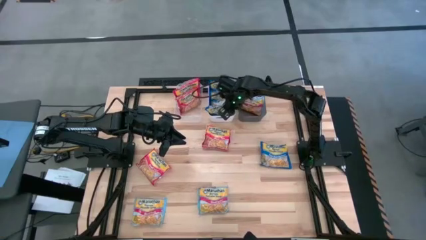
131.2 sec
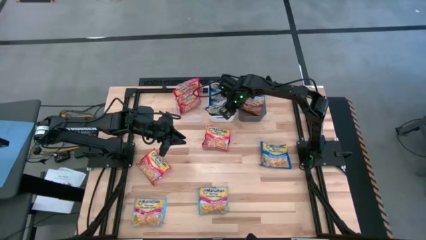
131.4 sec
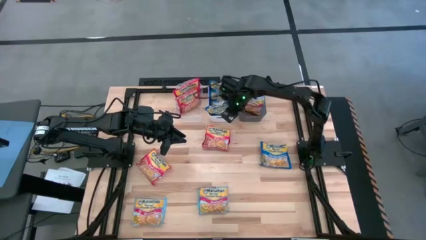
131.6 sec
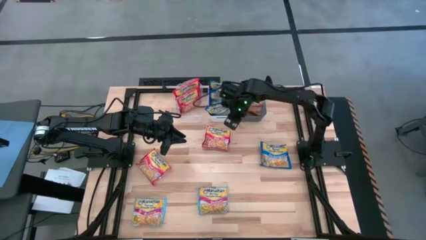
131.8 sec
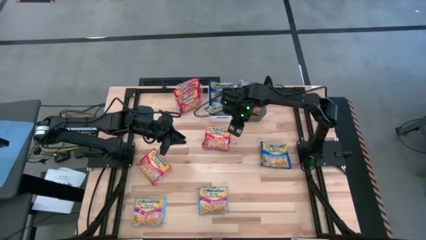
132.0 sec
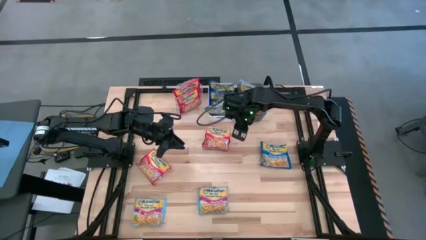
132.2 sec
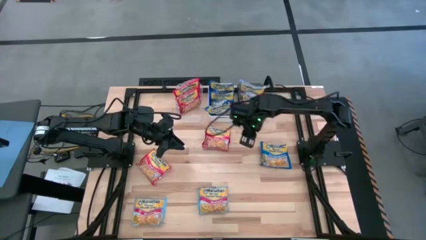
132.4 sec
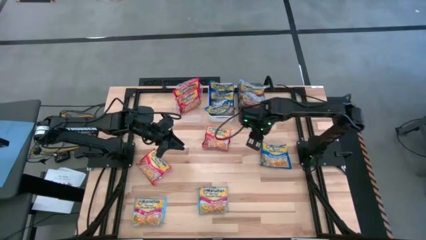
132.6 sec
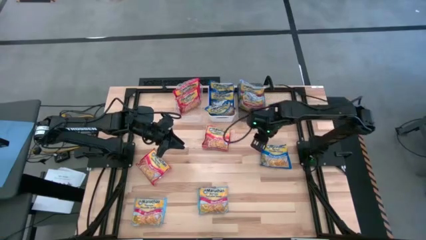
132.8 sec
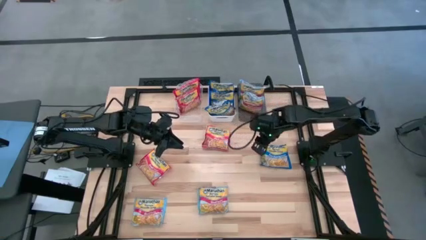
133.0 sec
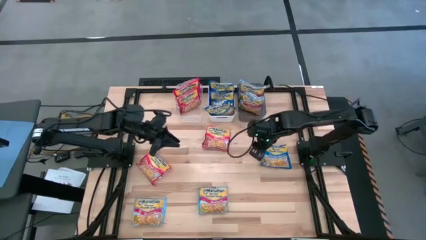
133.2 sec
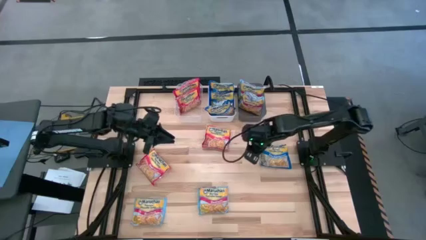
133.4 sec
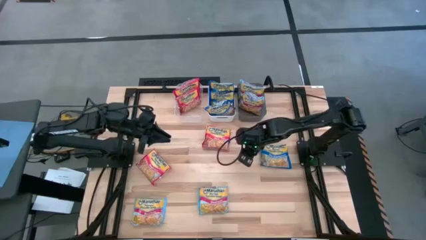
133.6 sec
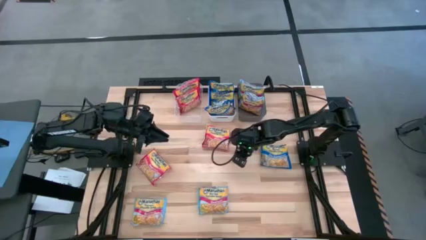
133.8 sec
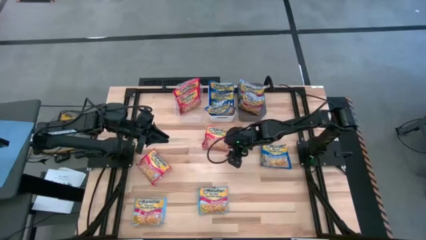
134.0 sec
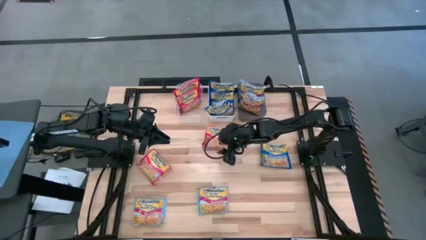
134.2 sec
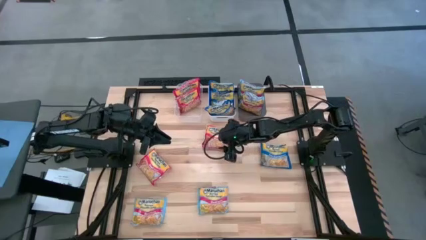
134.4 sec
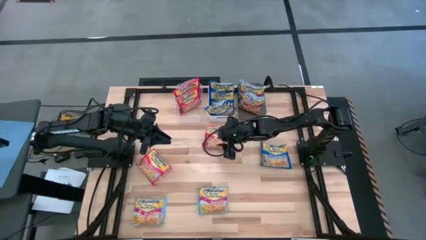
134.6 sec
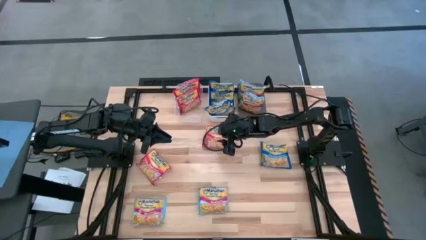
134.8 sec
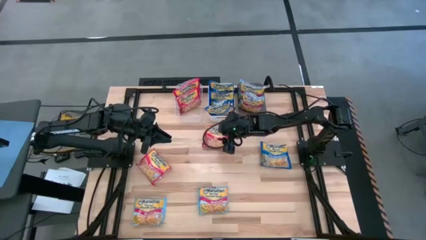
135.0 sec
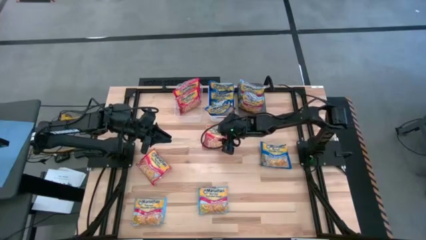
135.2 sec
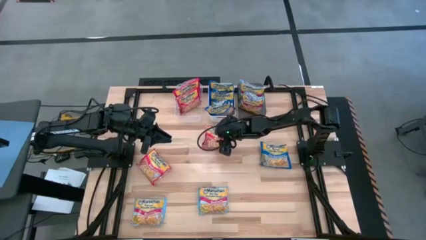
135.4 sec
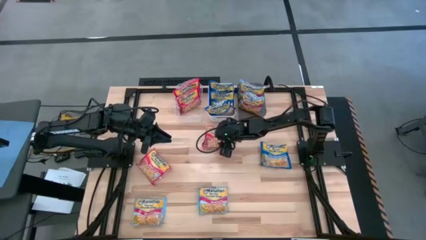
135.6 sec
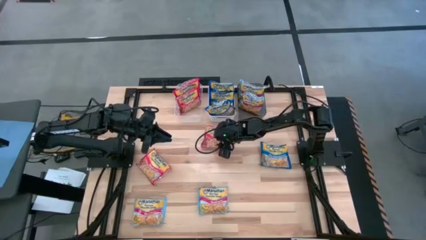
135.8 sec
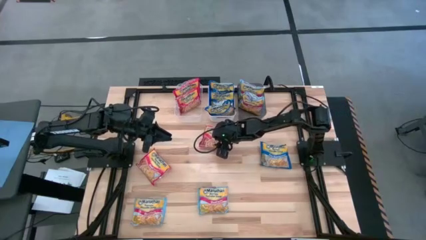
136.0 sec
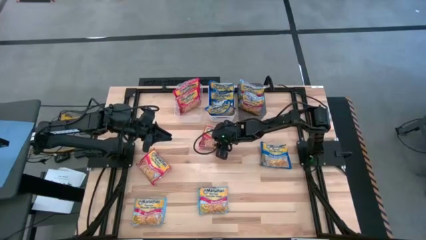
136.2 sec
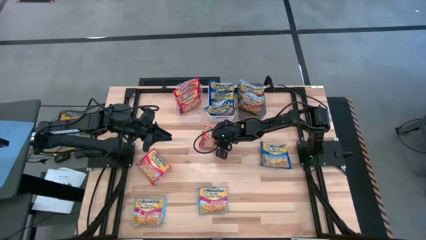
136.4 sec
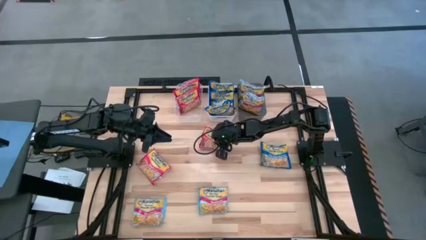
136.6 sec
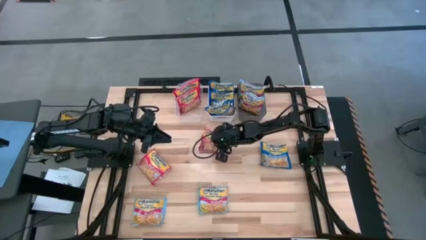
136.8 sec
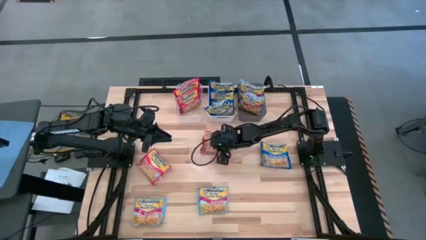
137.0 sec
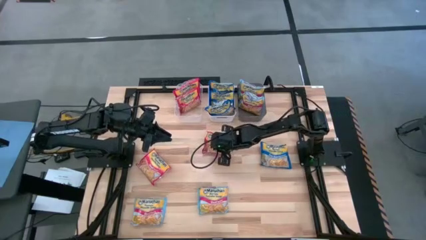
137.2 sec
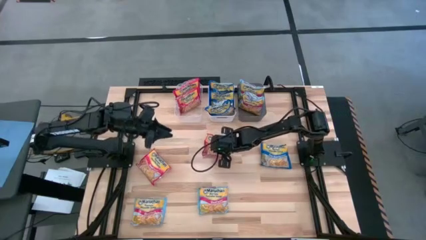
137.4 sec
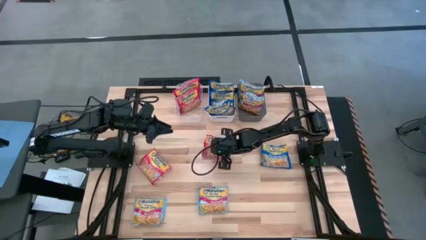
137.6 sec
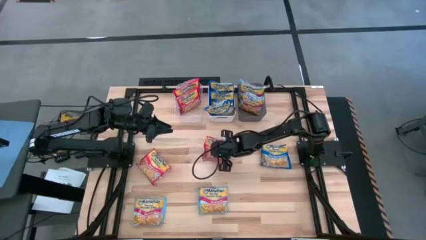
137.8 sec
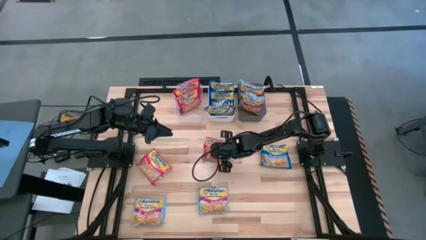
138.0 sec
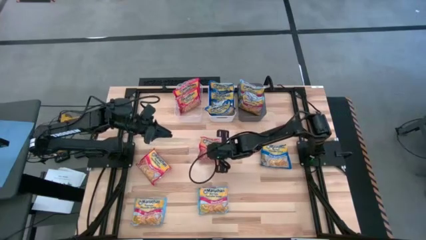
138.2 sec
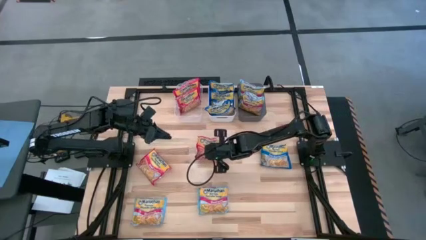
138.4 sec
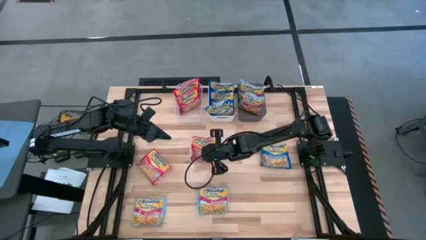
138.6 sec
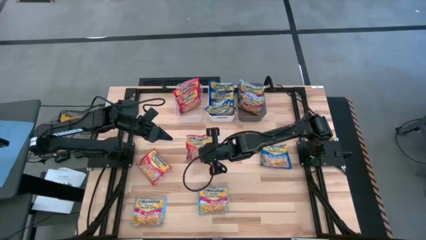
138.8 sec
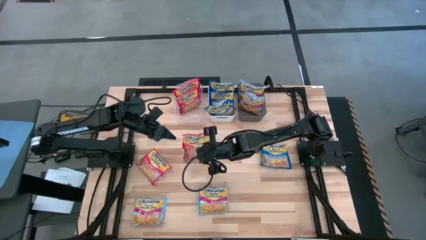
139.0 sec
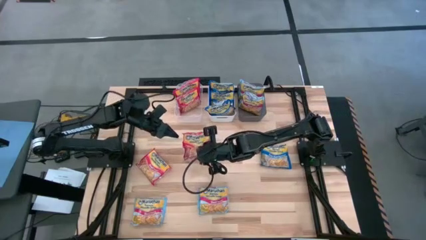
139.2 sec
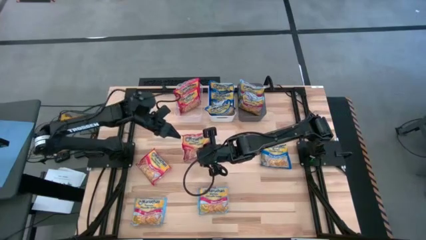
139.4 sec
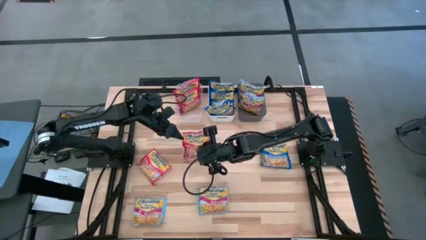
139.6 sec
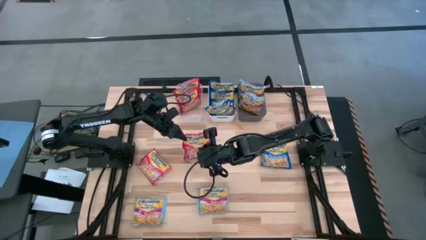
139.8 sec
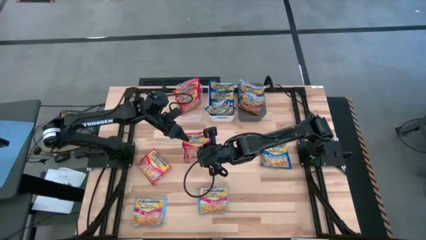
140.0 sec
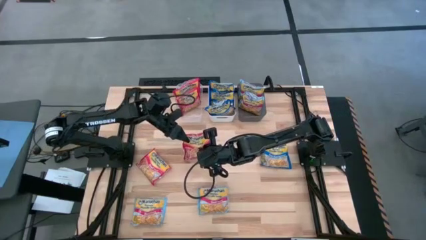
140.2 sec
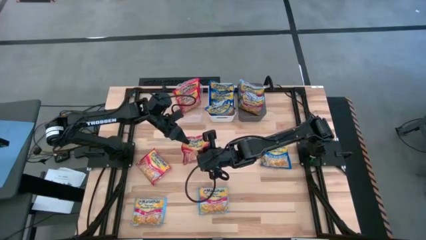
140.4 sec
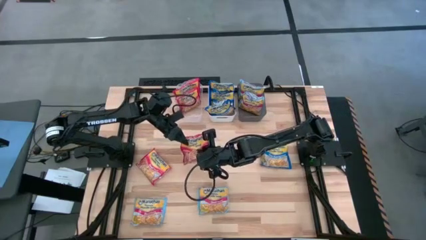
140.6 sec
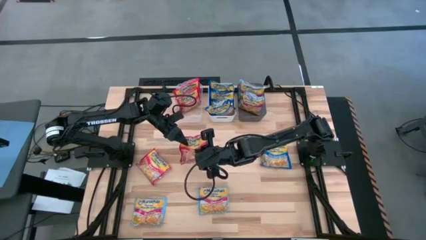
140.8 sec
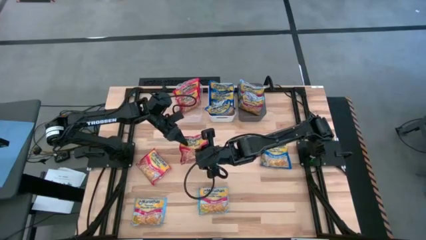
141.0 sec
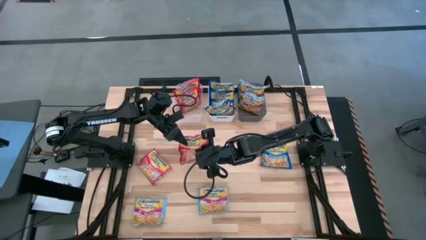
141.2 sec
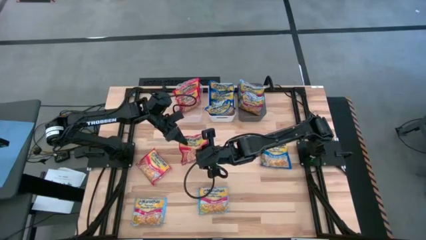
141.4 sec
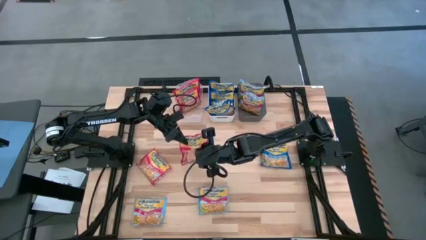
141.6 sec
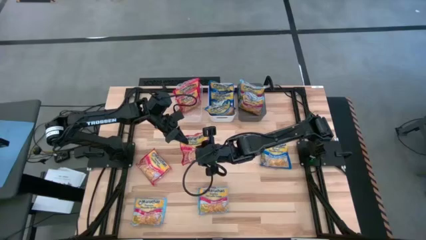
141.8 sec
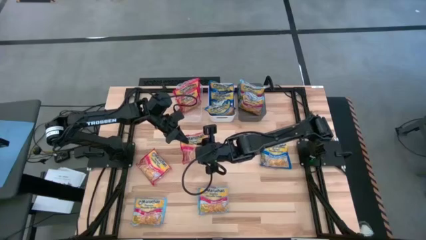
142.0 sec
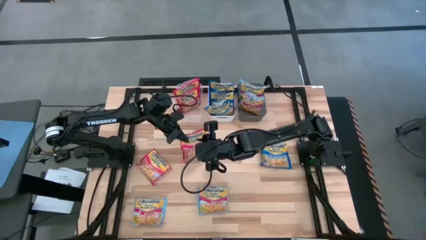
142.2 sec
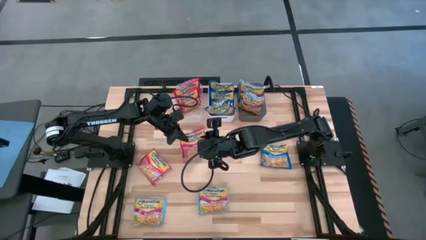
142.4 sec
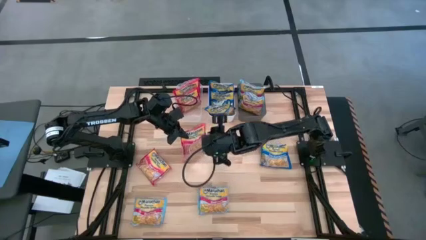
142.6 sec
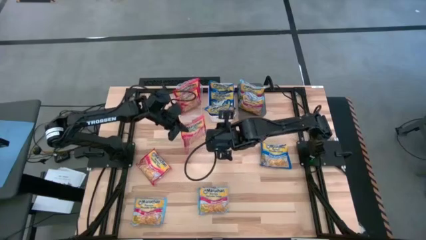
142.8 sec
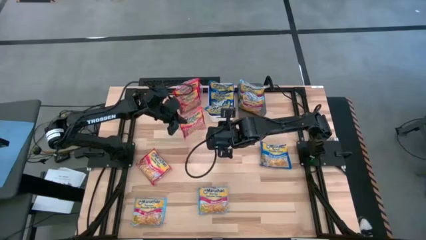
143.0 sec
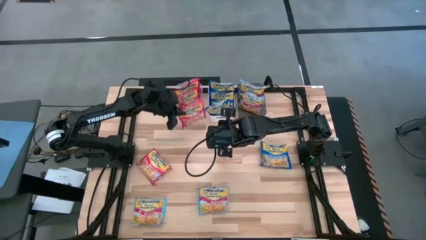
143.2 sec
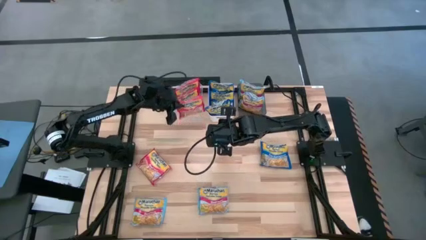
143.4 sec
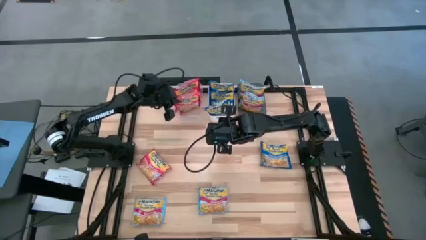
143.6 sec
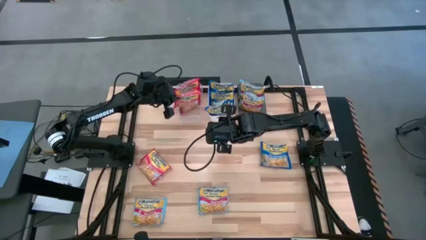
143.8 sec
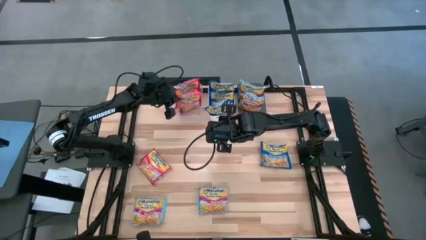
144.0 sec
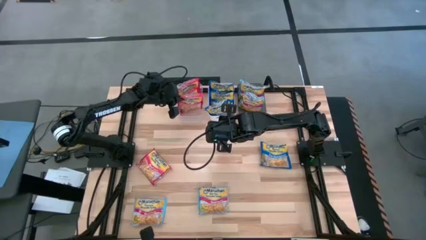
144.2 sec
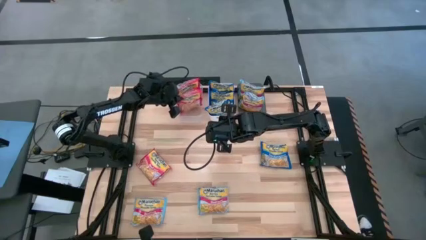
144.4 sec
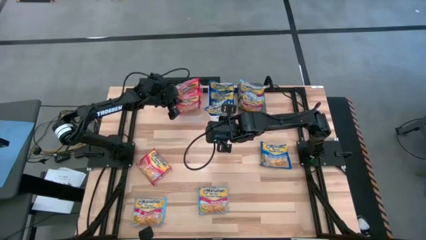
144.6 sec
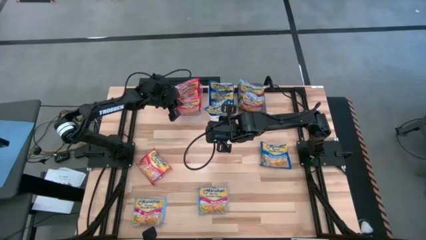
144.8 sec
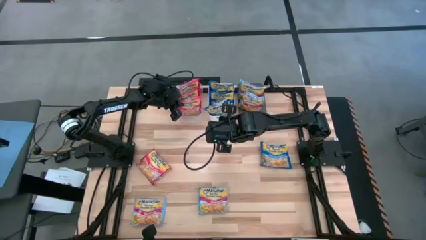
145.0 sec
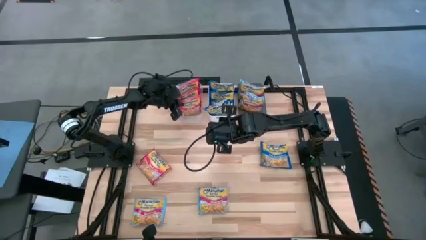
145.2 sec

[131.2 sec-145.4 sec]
Task: Sort Maruchan noodles
Put the red noodle pack into the transparent bin

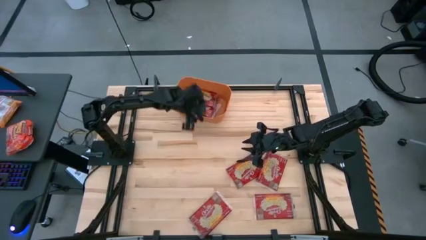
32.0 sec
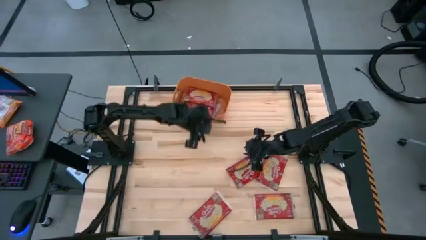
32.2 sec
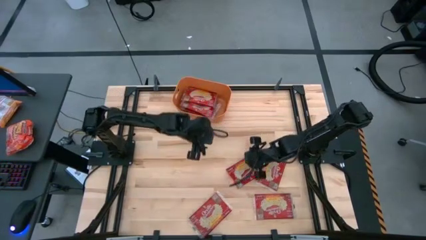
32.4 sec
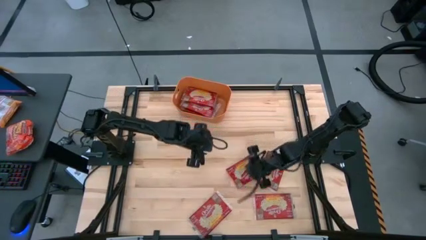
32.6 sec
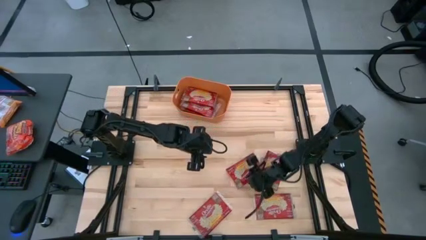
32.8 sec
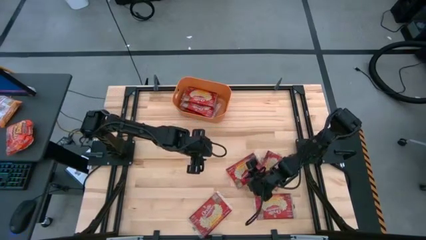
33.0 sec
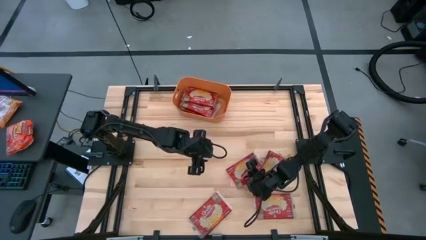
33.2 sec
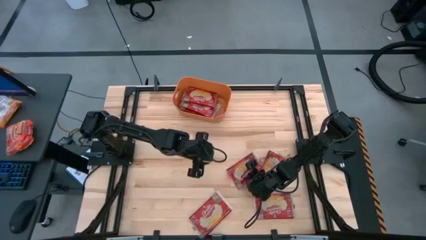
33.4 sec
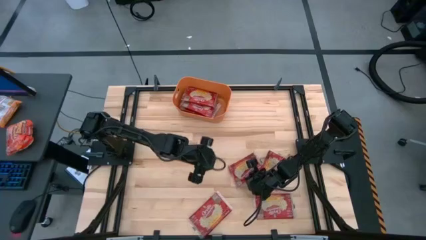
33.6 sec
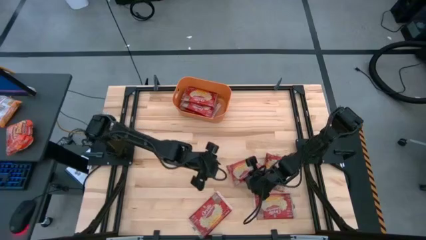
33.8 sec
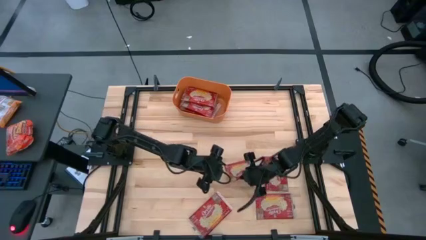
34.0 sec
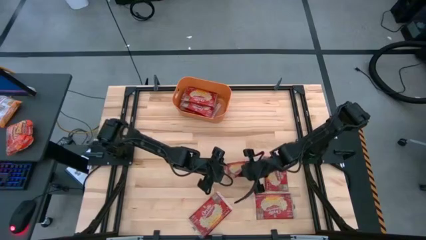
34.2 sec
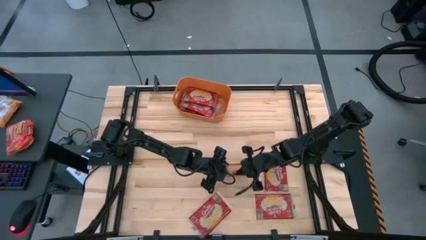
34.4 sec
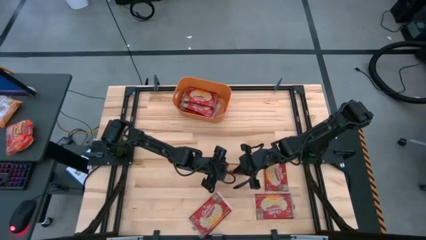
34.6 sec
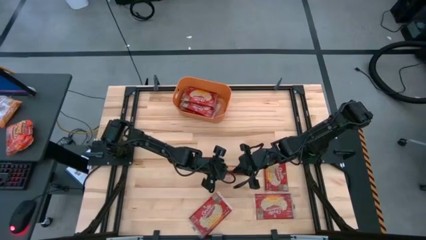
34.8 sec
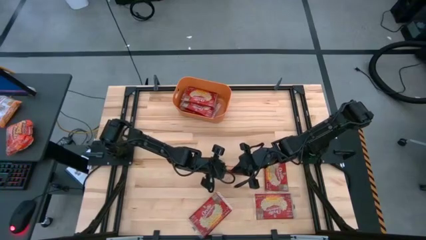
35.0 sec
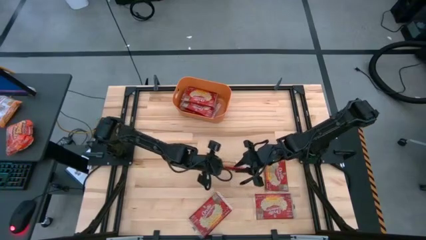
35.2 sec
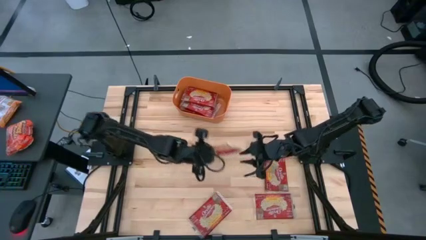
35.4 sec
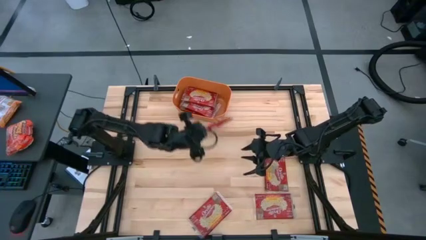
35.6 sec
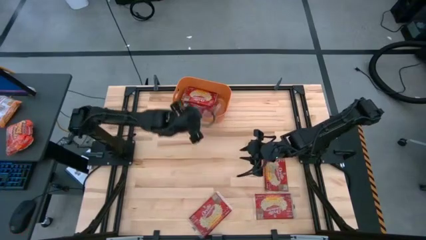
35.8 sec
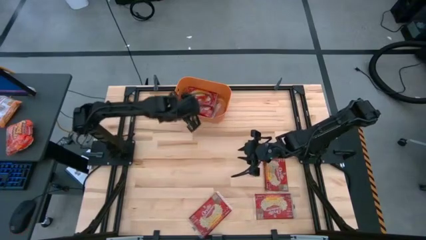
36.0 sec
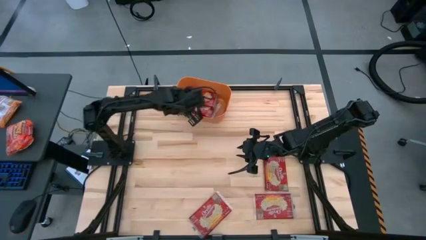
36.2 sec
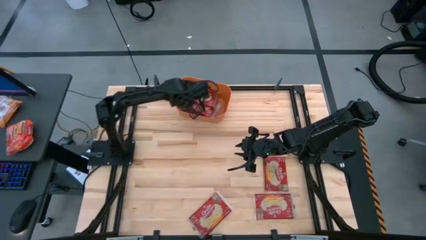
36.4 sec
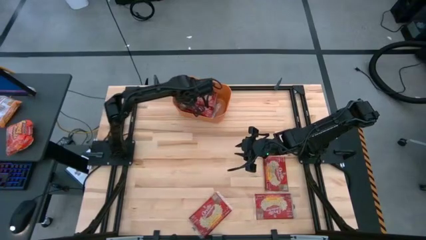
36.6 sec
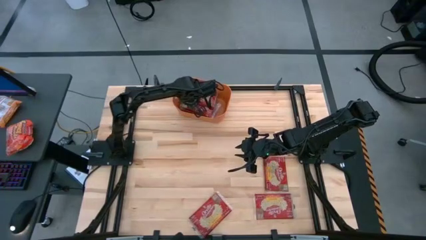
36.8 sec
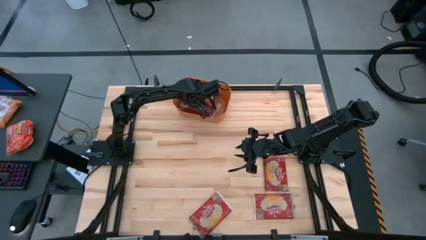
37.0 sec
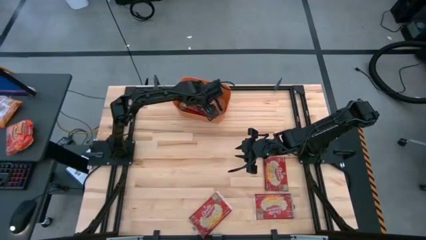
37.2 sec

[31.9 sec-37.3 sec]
Task: Sort popcorn bags into baskets
Put the red popcorn bag into the orange bin
